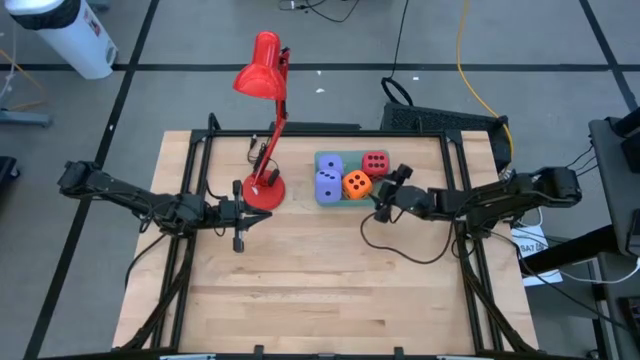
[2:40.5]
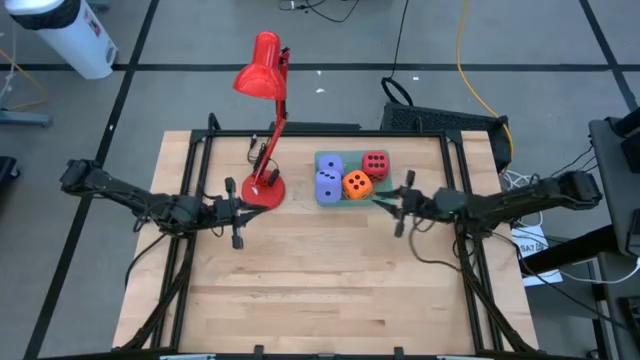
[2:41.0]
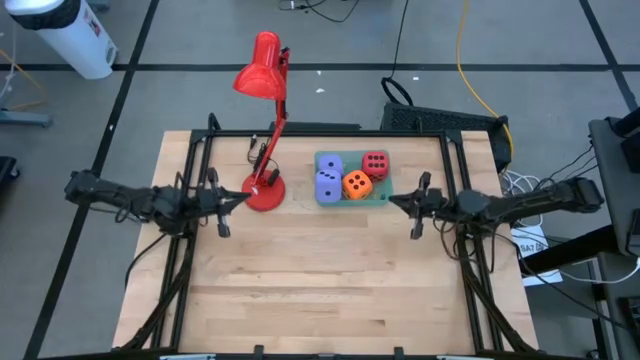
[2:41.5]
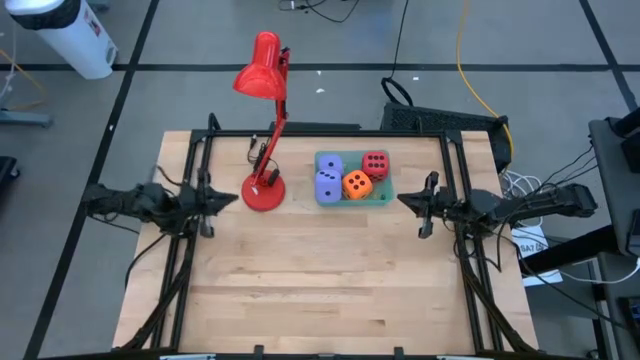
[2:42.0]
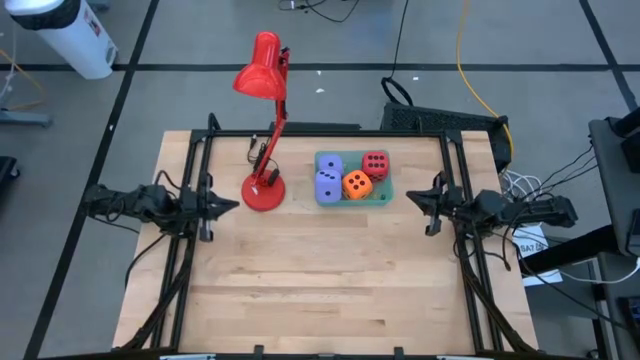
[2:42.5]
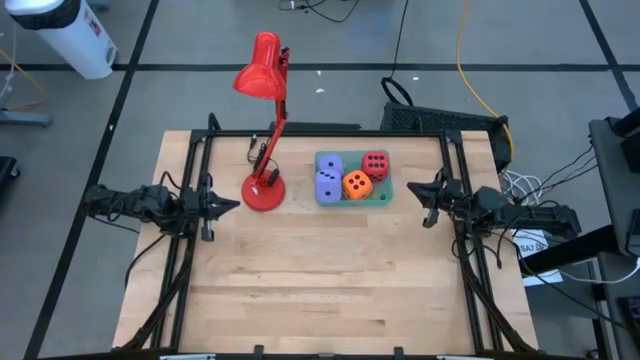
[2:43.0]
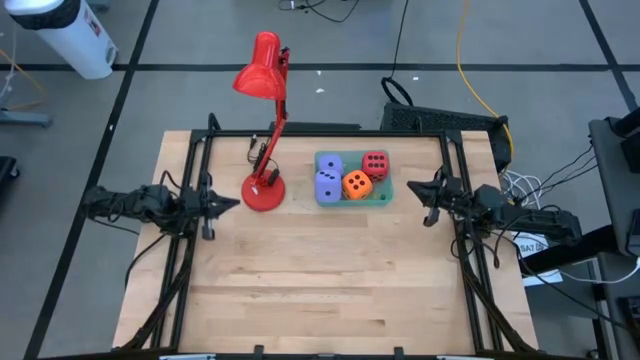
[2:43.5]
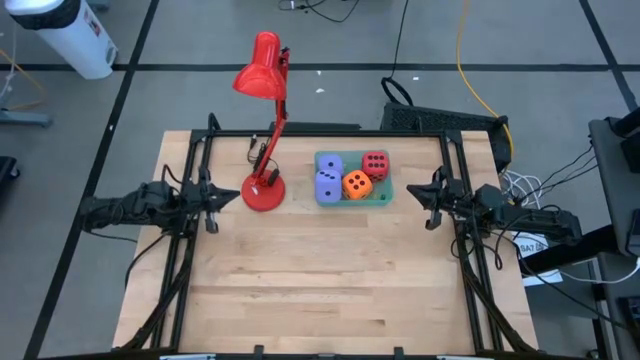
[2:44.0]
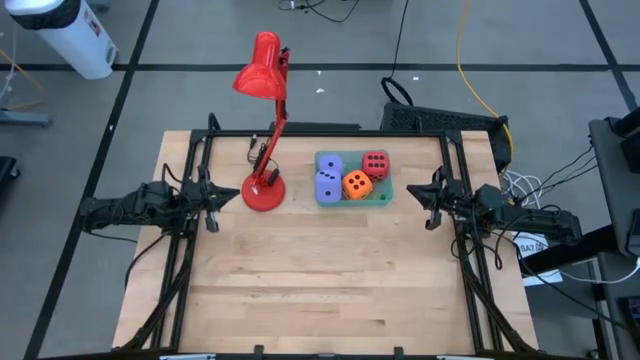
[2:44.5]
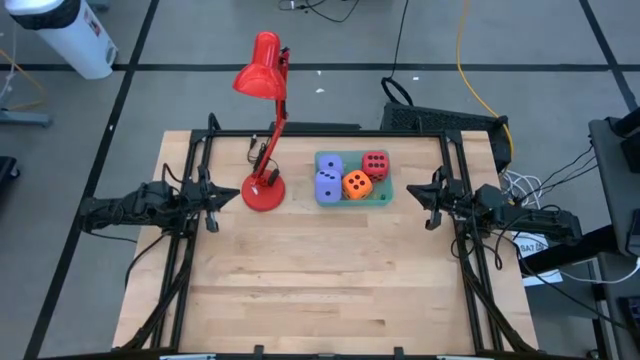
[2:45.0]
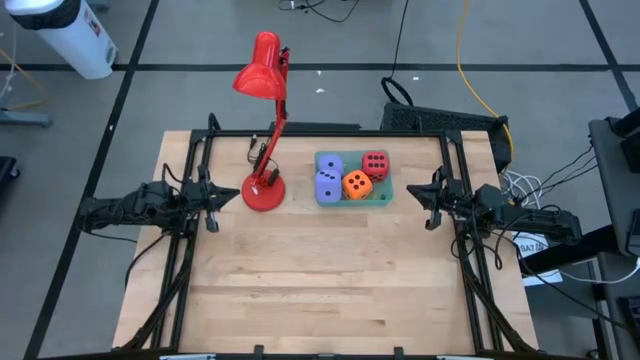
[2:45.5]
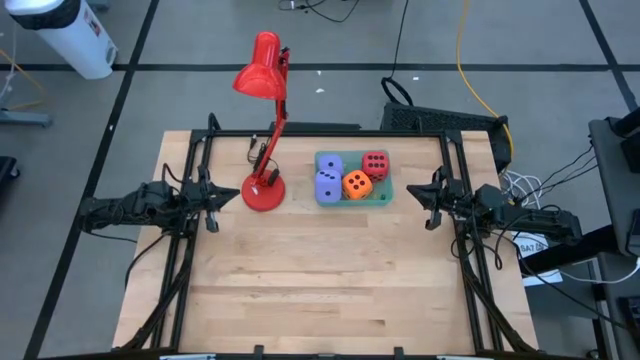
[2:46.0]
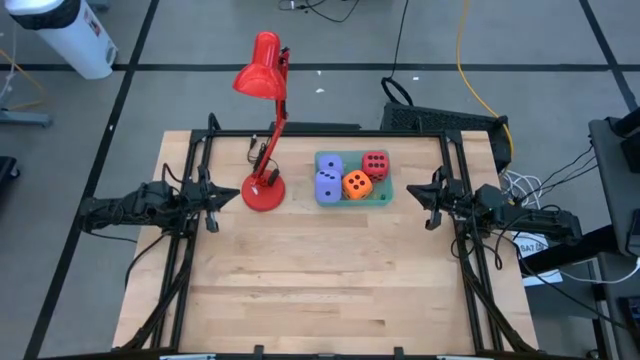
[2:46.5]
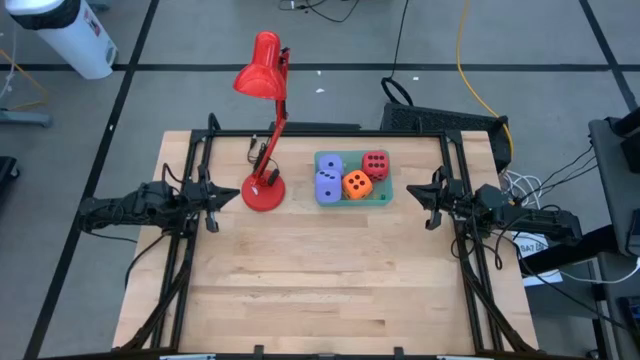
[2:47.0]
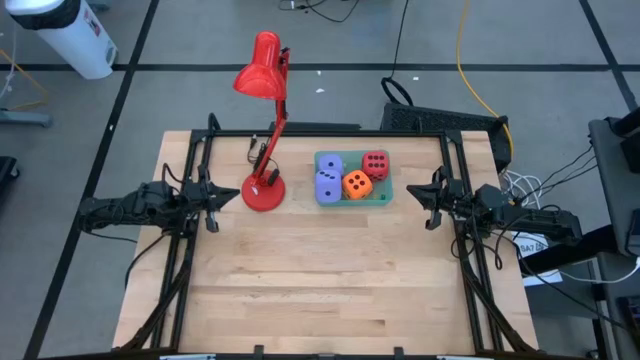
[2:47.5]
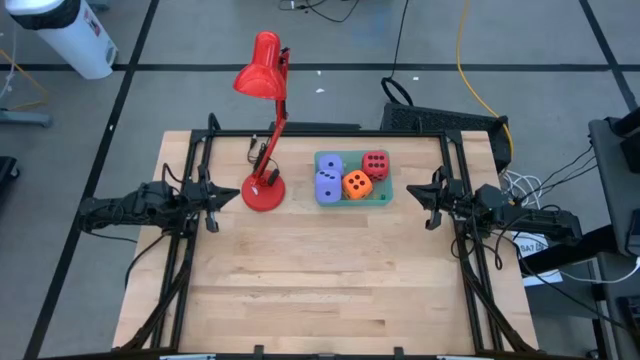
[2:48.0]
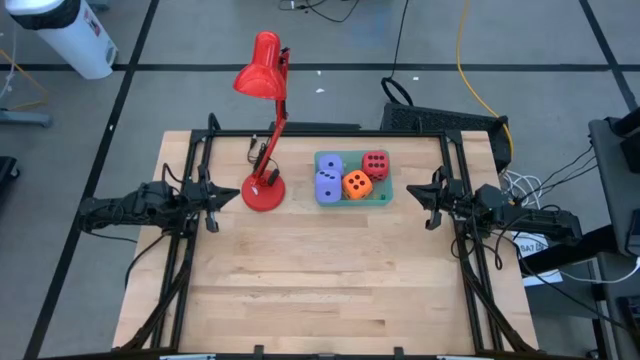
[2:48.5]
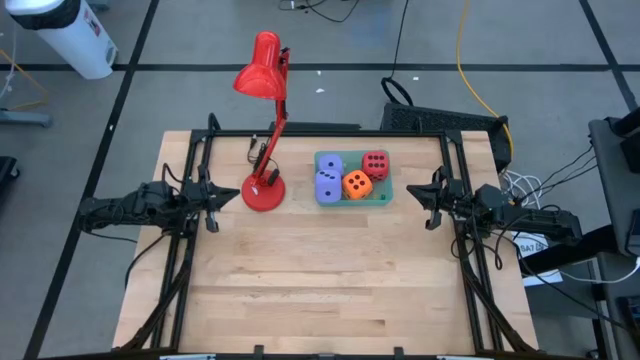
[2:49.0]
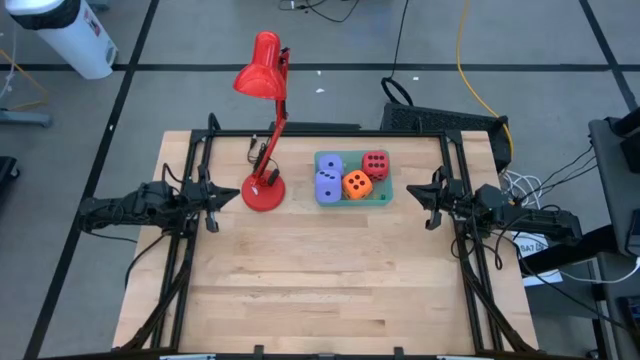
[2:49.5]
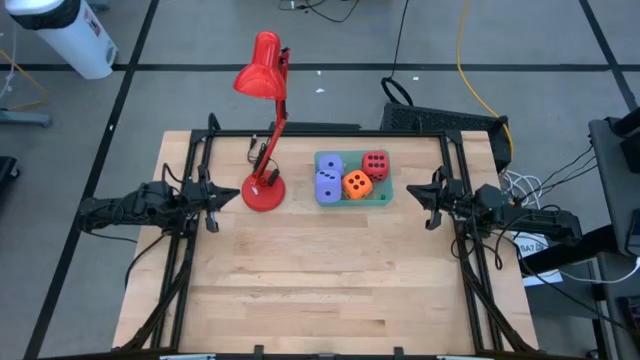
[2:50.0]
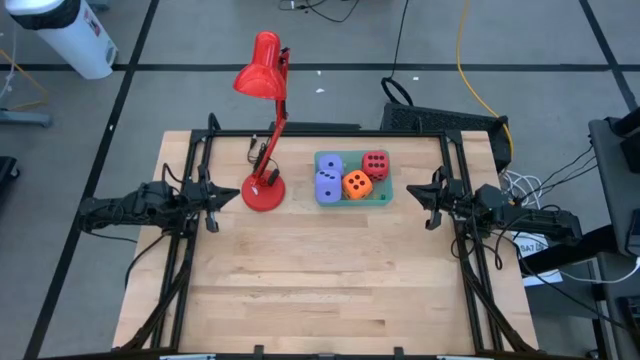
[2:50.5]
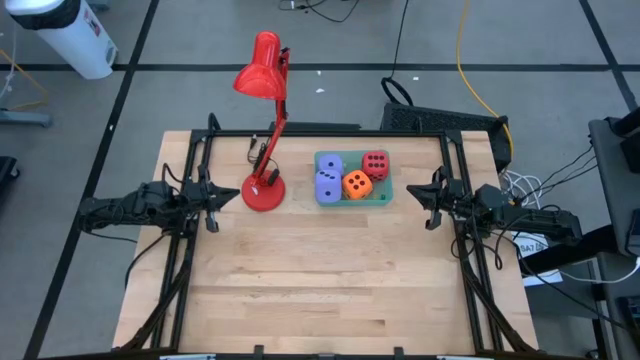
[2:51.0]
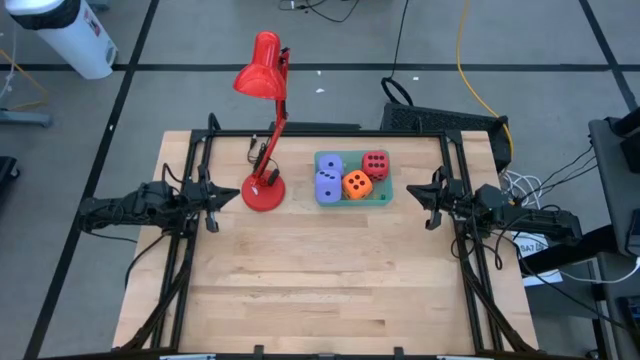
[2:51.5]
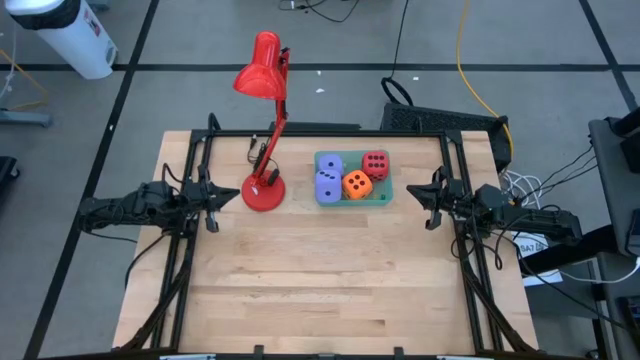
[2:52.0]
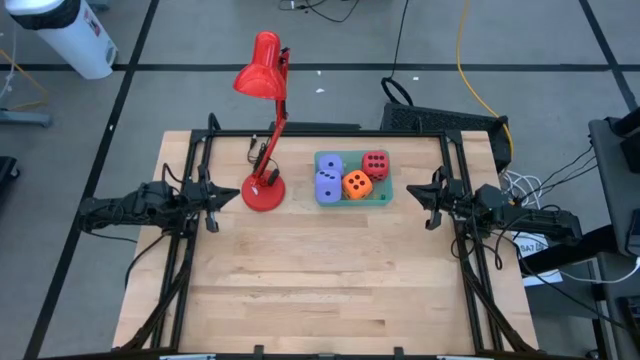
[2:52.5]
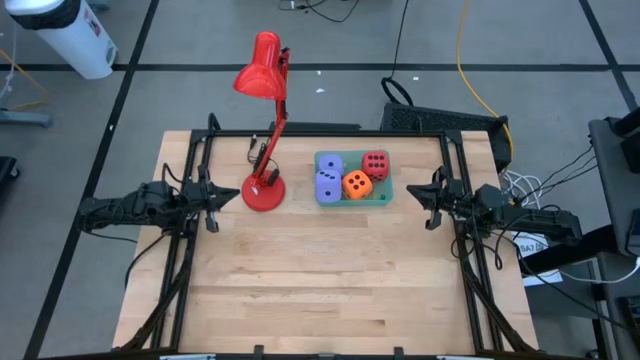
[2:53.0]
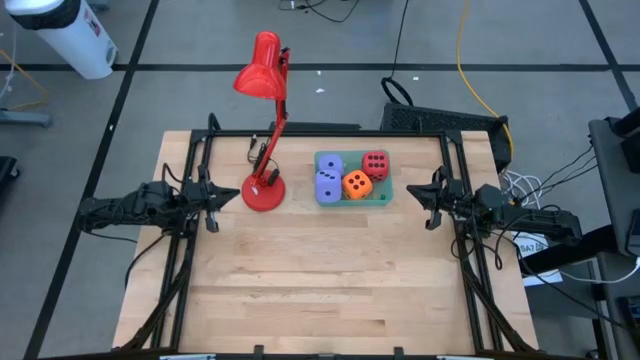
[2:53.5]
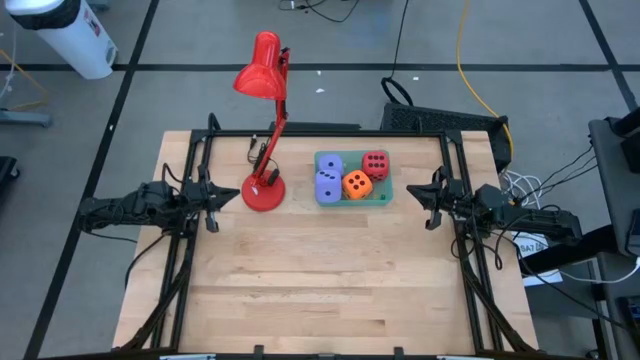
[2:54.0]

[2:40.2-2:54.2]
Task: Pick & Place Dice
Return to Home Position

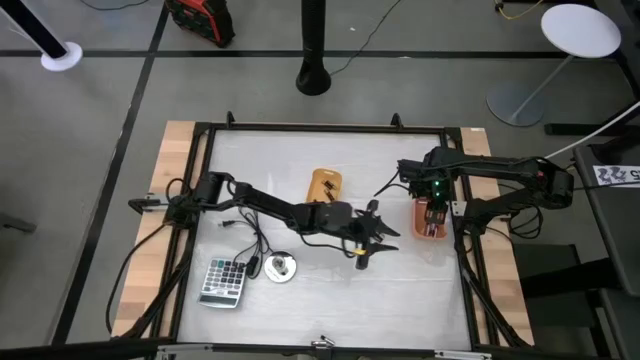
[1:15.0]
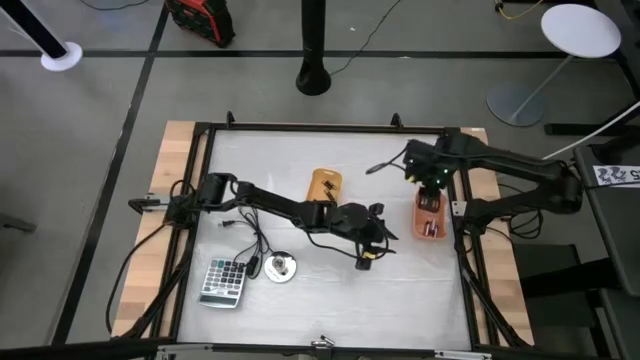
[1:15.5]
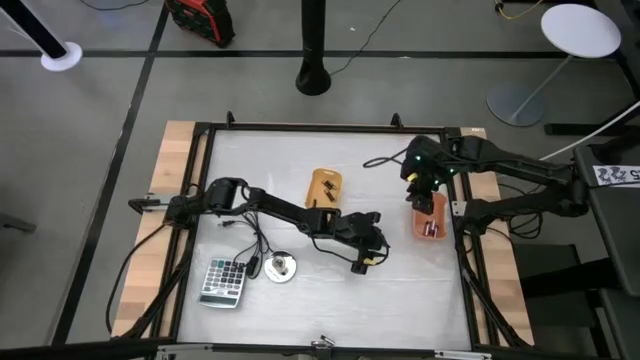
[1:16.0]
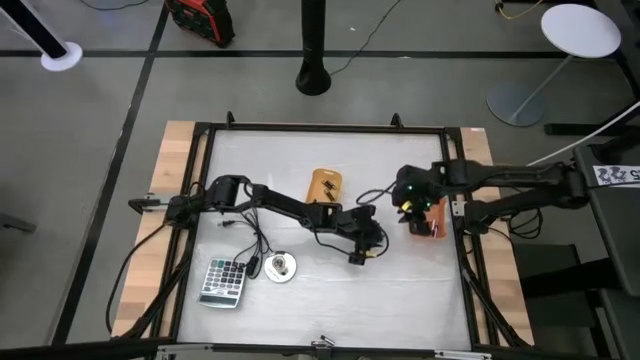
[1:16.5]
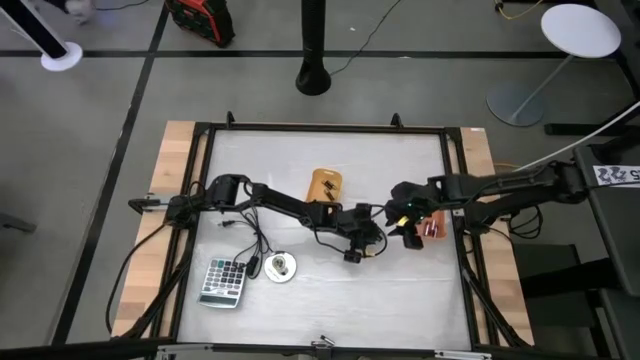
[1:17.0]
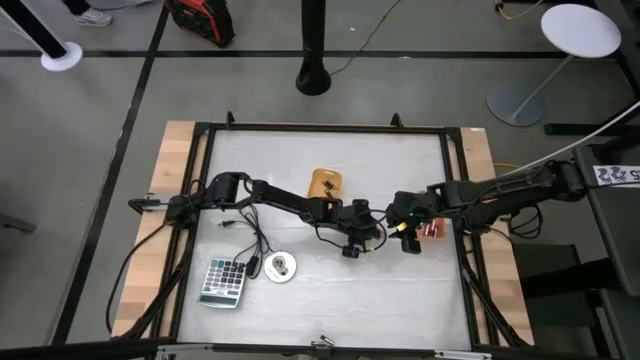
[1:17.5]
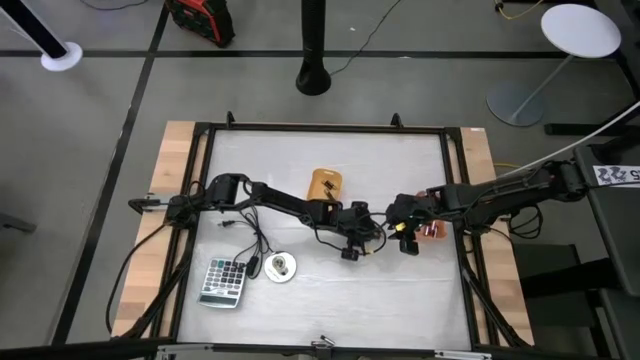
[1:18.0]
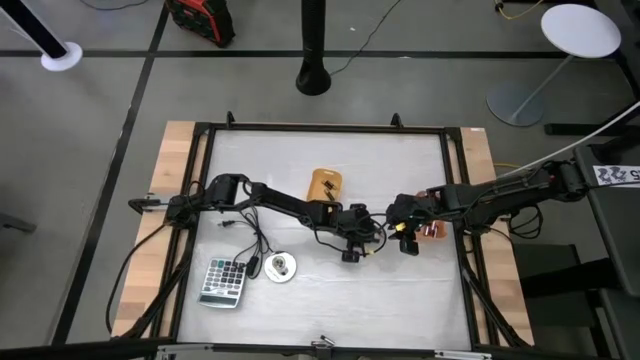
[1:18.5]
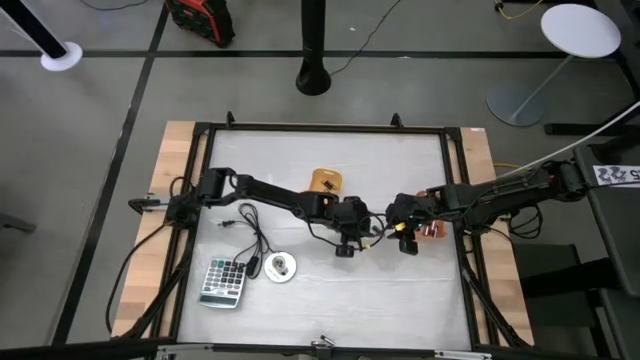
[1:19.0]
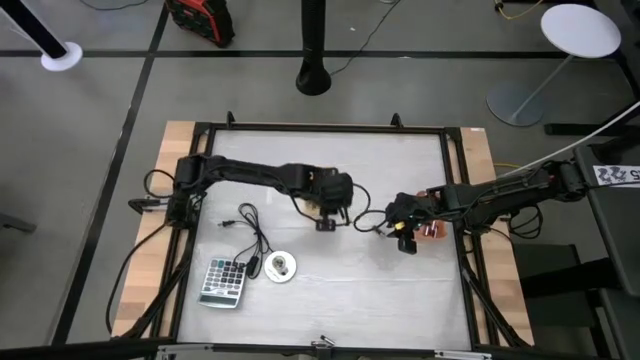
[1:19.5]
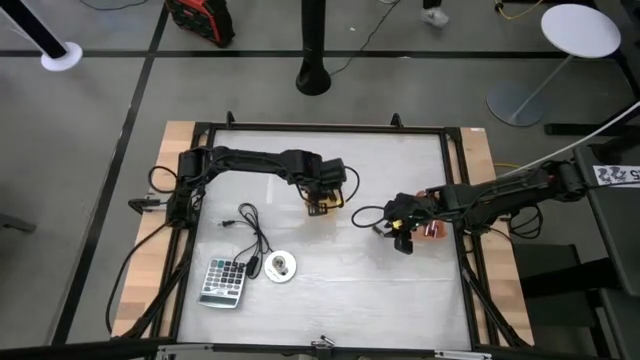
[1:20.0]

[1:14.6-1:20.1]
Task: Sort batteries
Put the black battery into the yellow bin

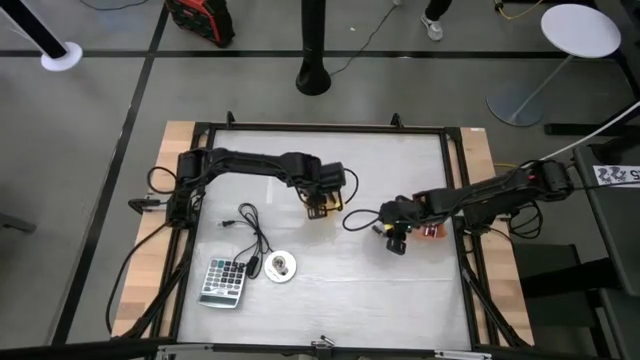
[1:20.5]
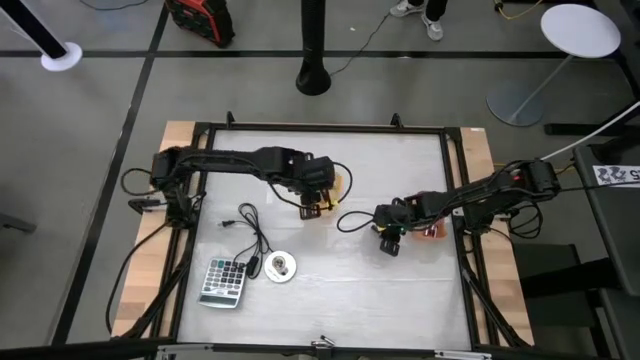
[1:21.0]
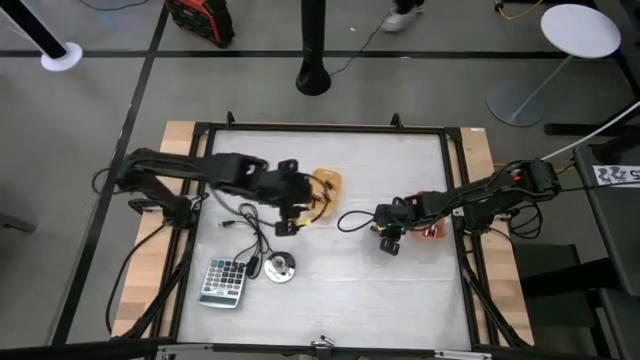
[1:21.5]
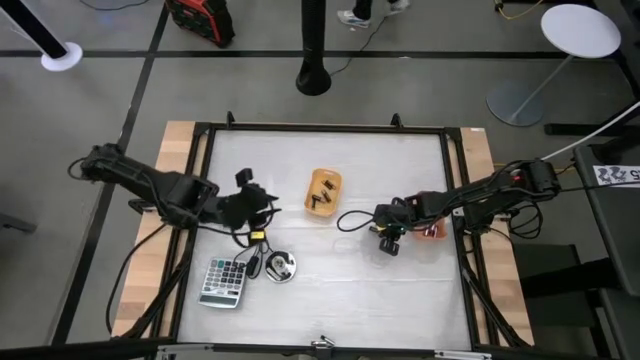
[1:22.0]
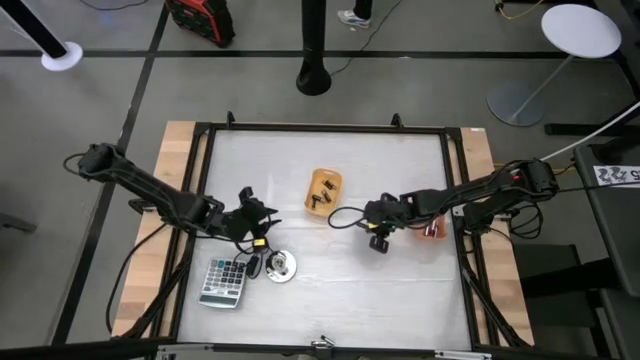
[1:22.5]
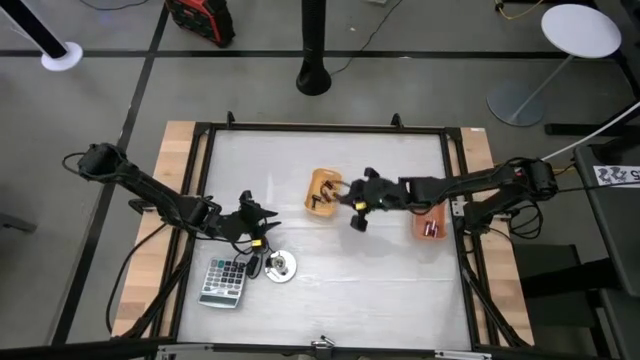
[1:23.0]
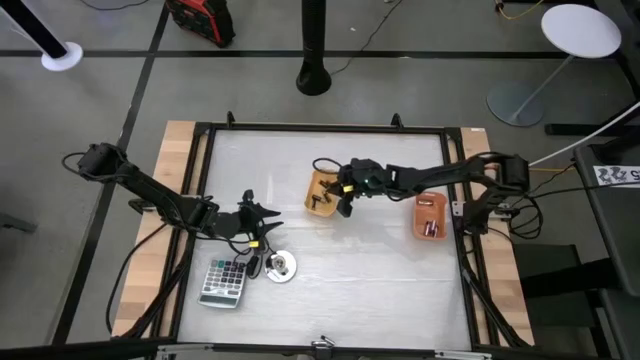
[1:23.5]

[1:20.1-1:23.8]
Put the black battery into the yellow bin
